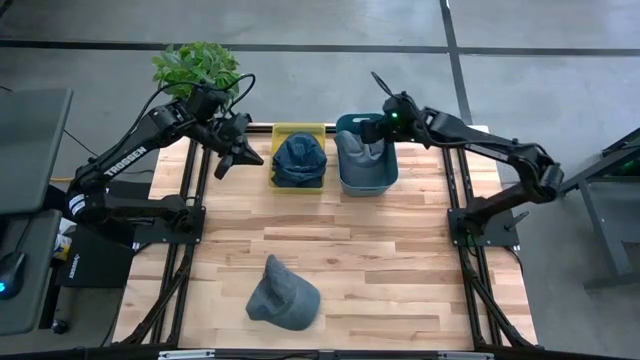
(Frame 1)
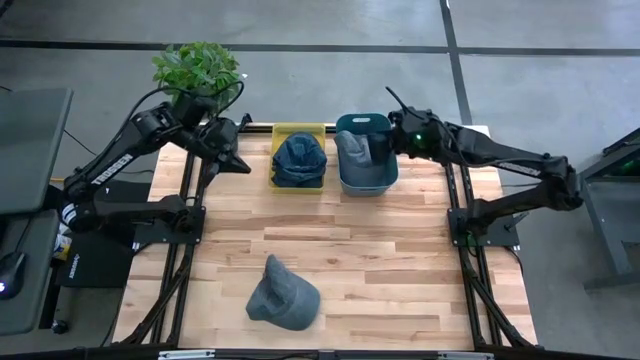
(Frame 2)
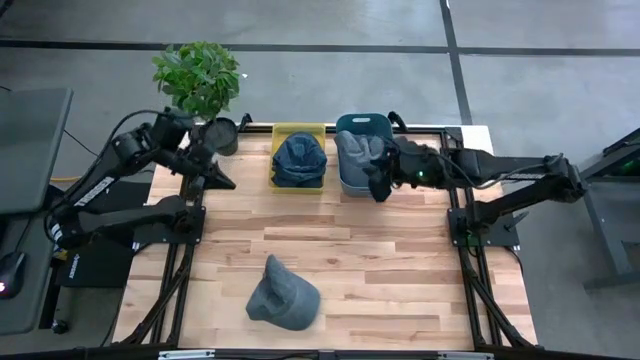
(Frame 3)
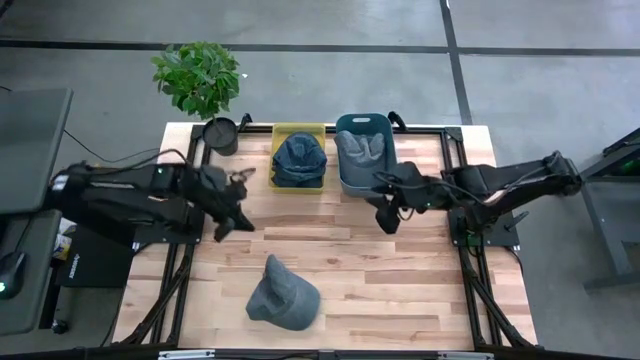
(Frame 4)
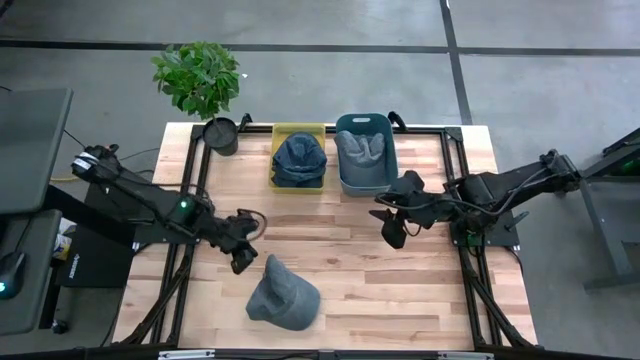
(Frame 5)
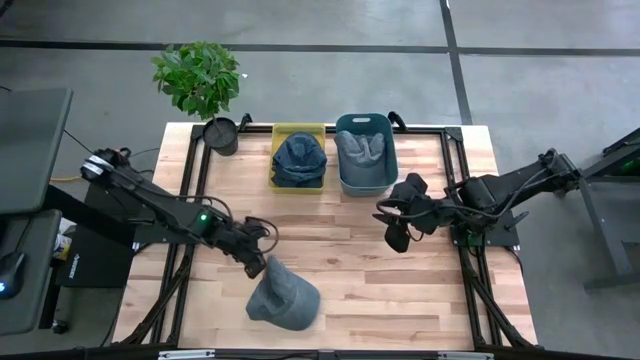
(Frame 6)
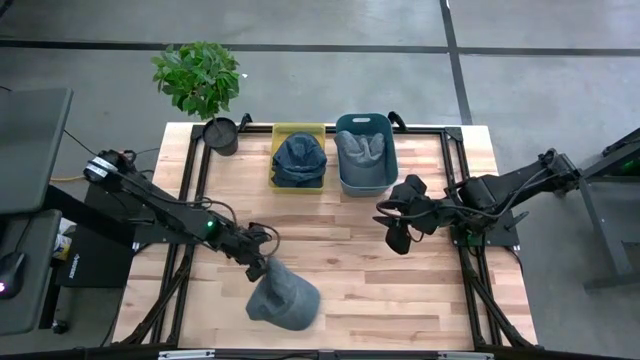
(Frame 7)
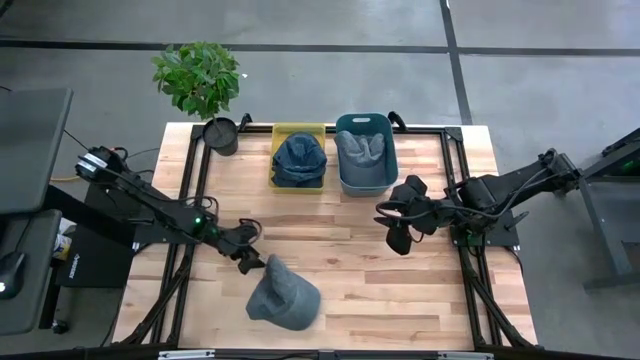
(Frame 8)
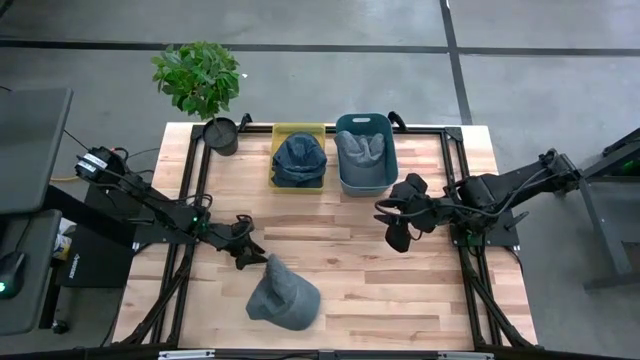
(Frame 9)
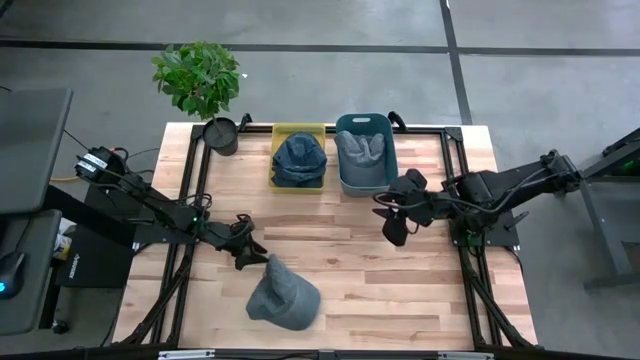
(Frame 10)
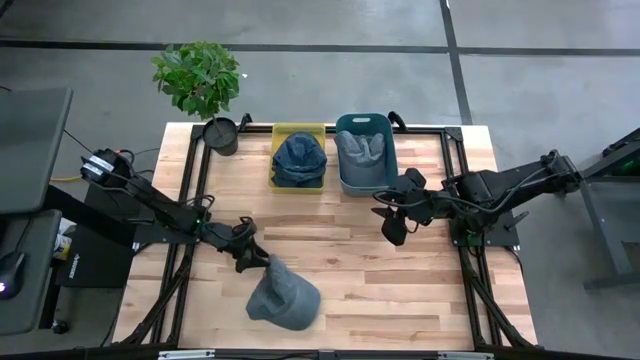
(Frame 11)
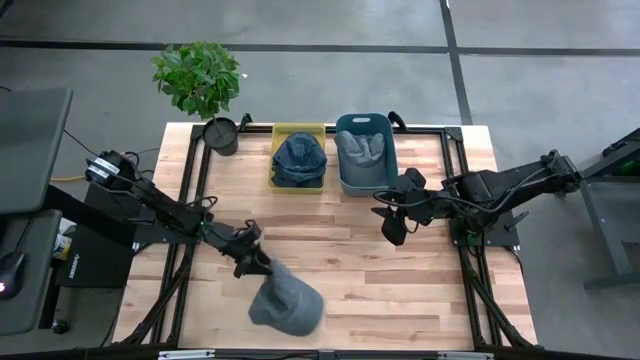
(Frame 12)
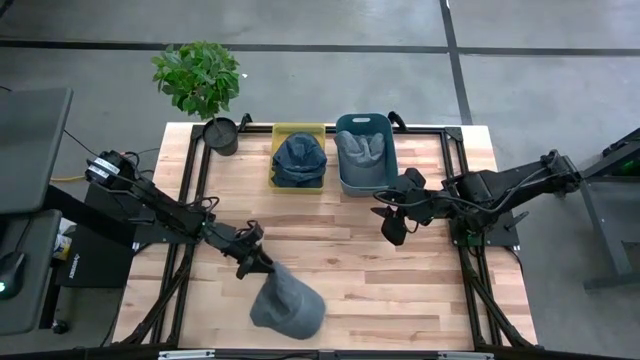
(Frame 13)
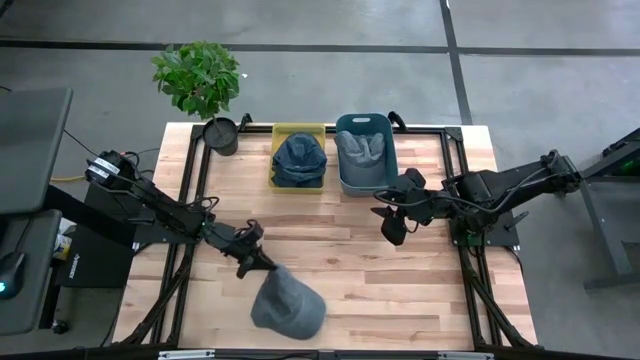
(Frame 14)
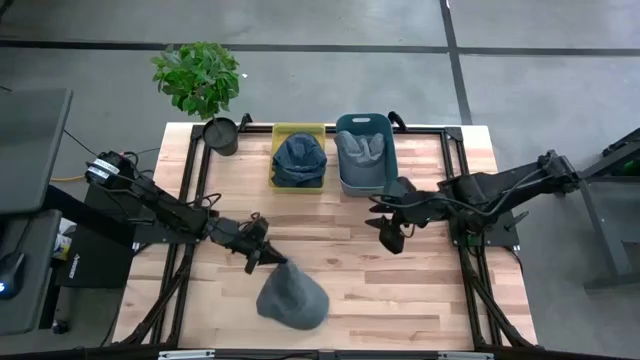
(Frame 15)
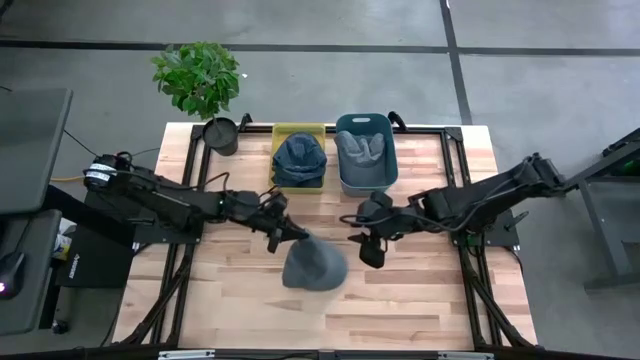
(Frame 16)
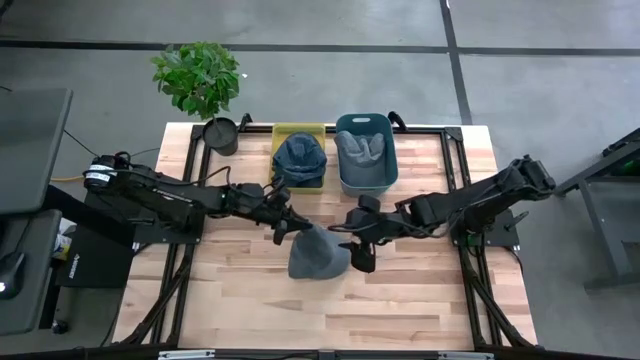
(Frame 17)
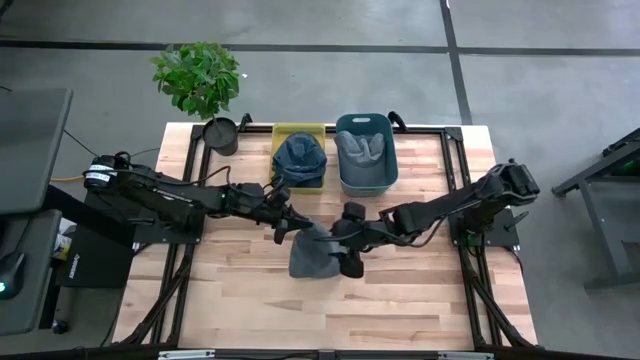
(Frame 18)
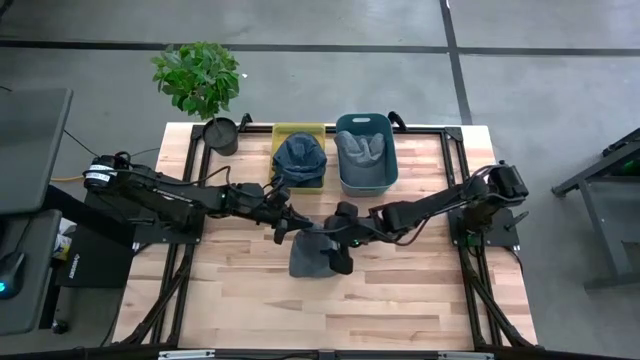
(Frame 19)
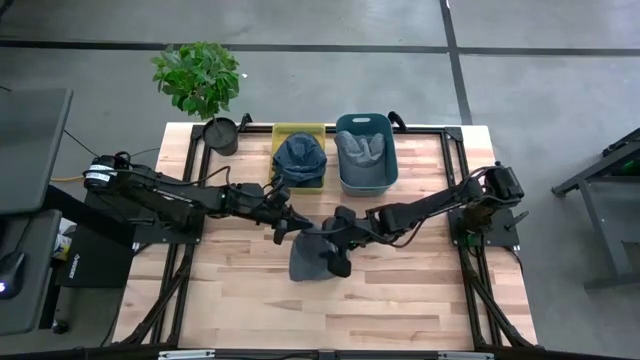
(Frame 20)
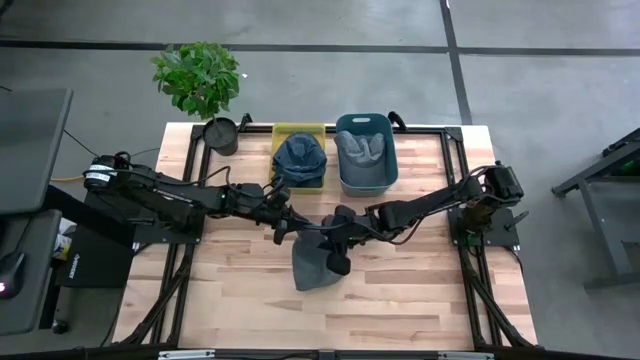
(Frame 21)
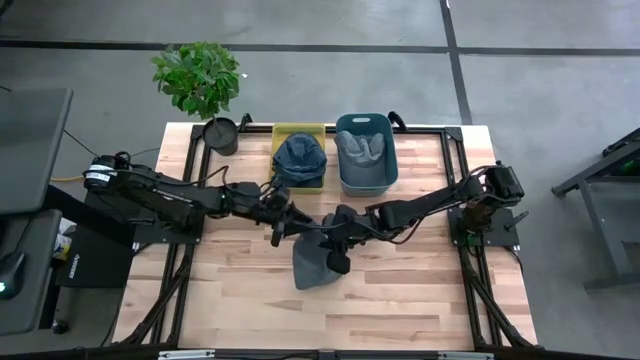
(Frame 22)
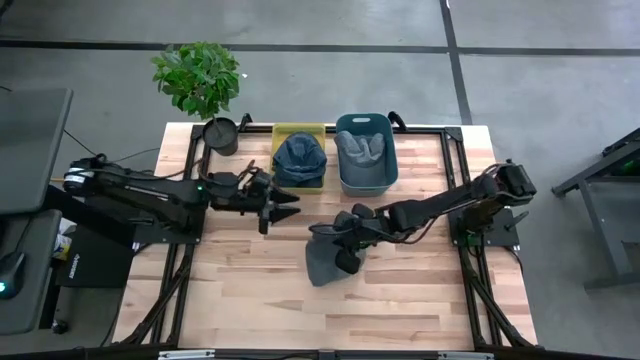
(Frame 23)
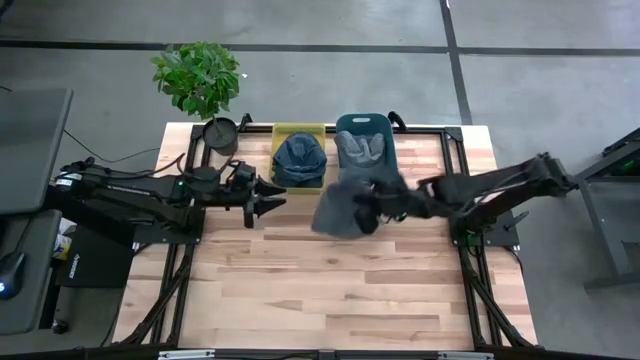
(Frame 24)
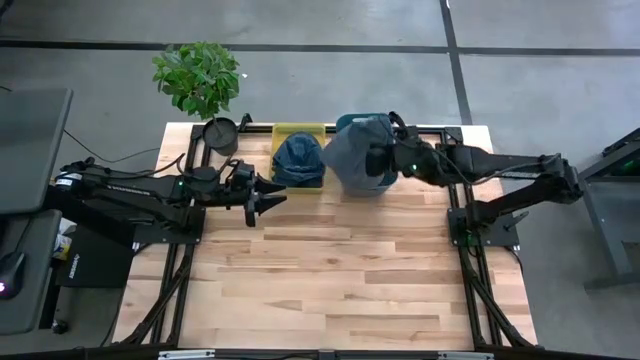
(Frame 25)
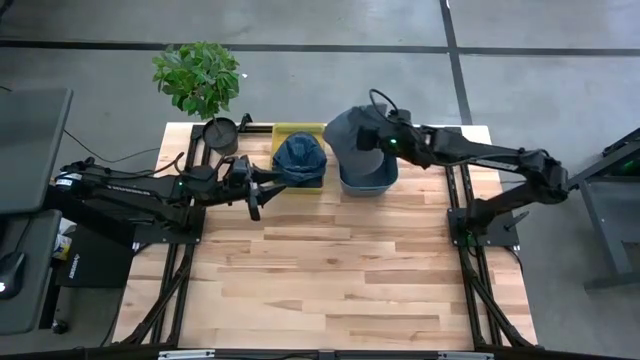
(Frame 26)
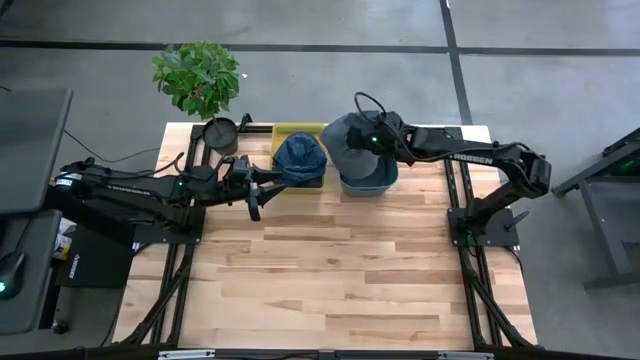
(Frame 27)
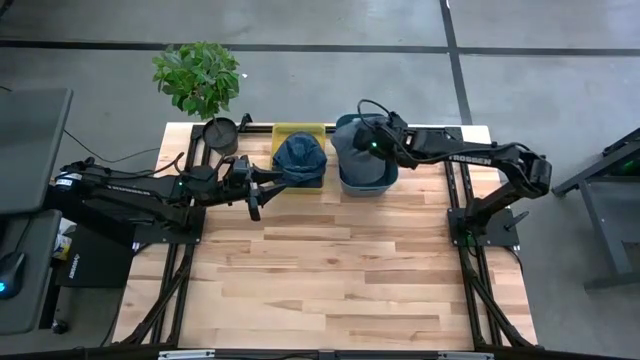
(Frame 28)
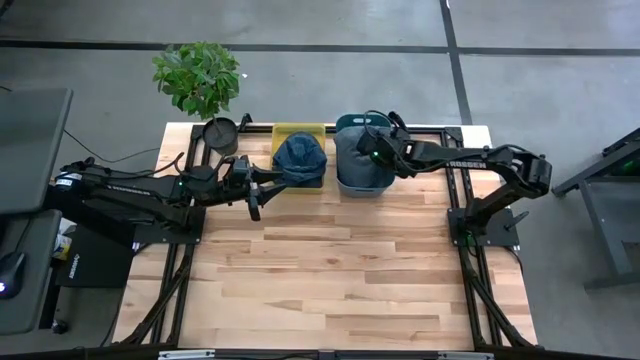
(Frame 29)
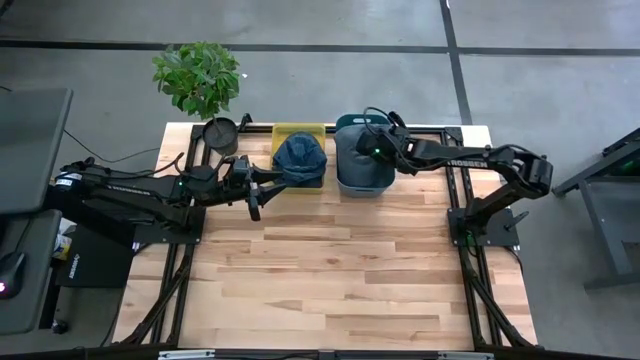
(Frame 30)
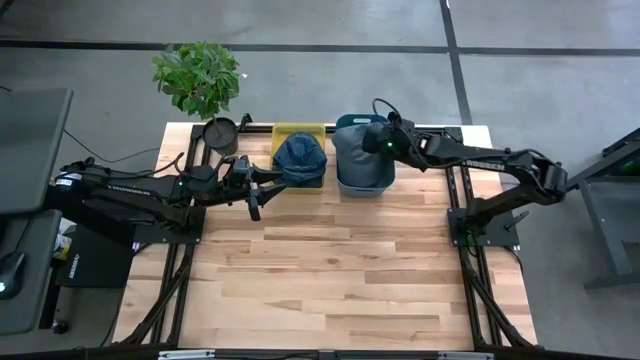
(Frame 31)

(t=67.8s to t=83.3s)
Task: Pick & Place hat
Put the gray cap into the blue green bin

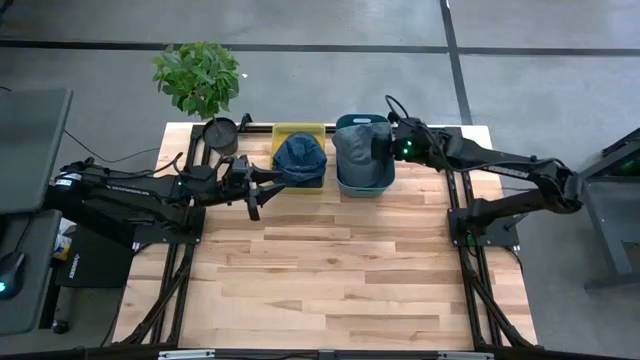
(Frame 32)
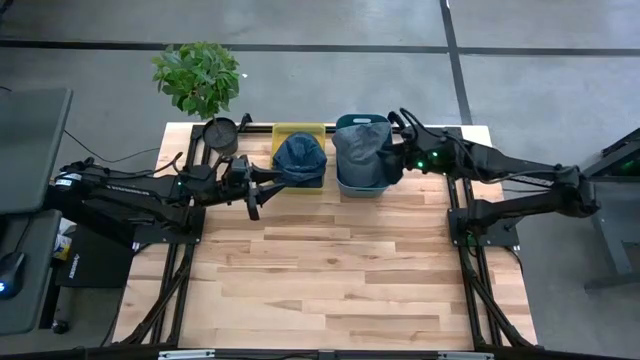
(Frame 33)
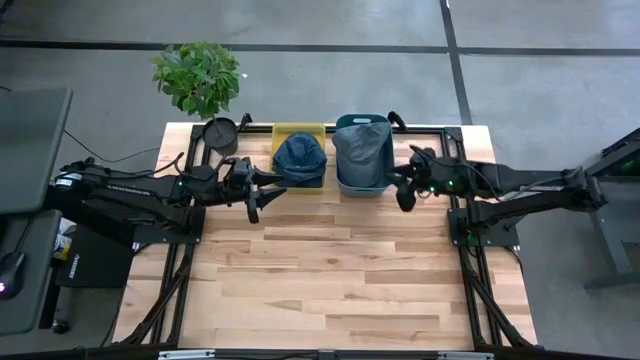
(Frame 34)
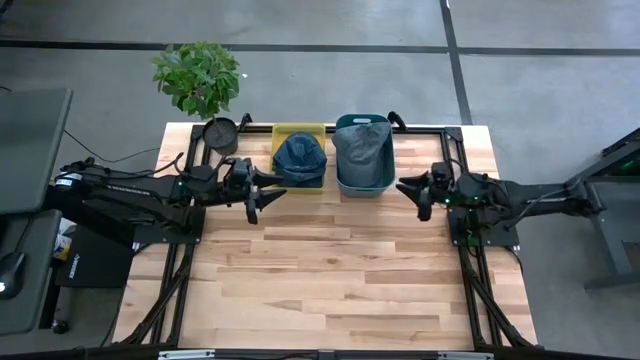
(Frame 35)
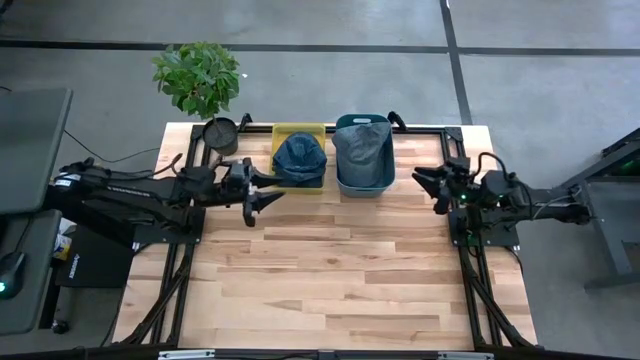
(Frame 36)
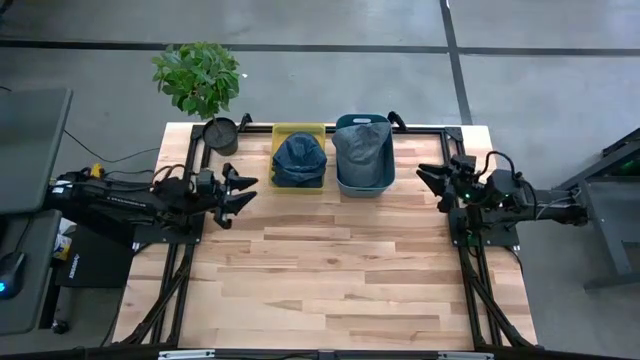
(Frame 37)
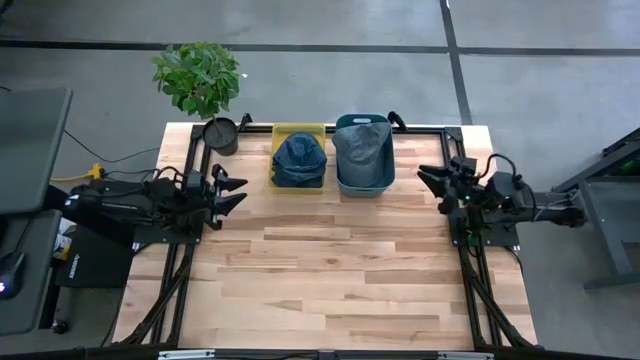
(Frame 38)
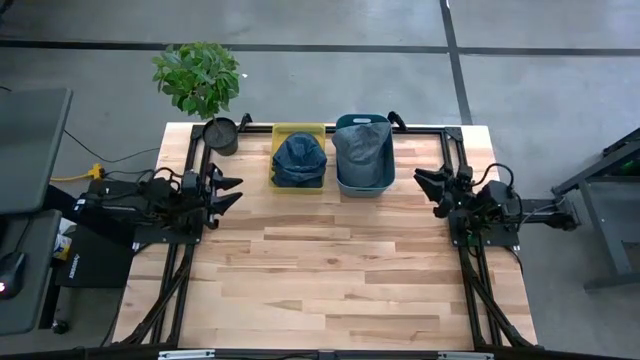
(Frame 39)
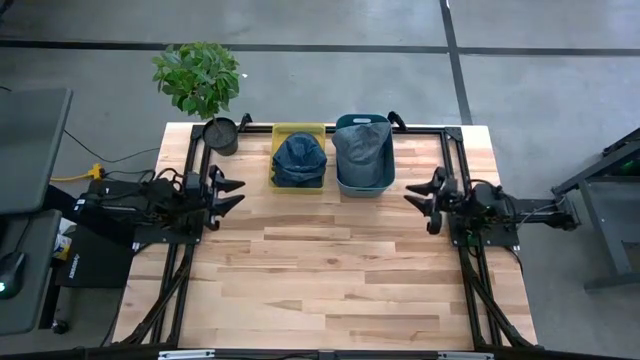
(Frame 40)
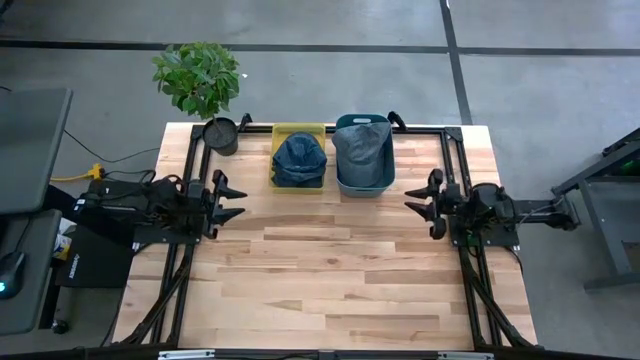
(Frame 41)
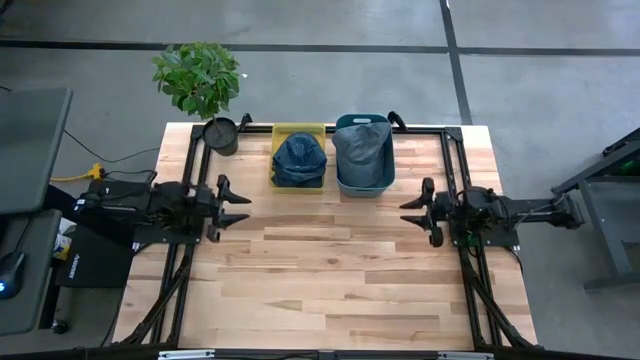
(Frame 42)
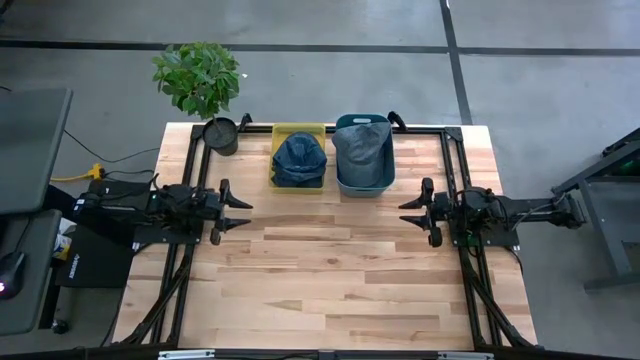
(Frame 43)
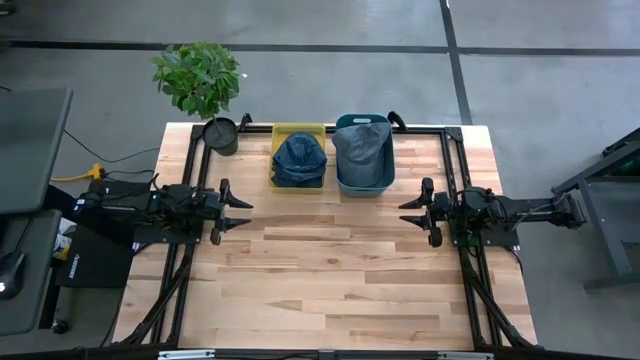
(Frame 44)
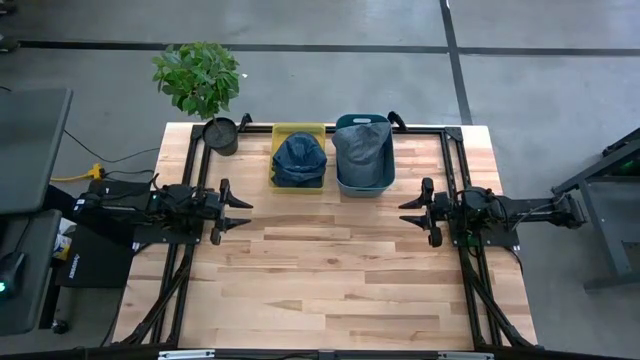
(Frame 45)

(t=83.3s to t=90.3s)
Return to Home Position
